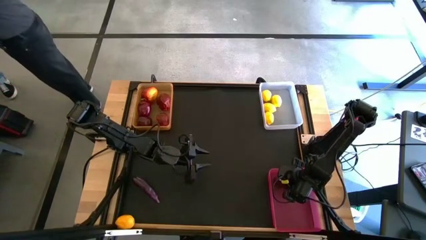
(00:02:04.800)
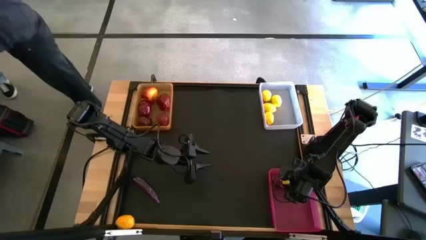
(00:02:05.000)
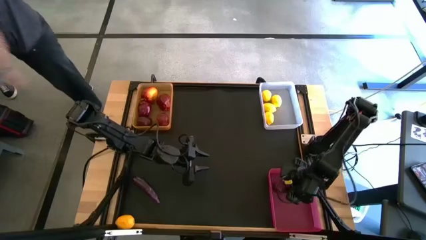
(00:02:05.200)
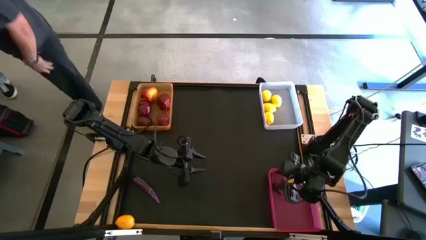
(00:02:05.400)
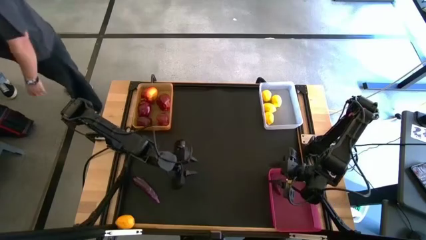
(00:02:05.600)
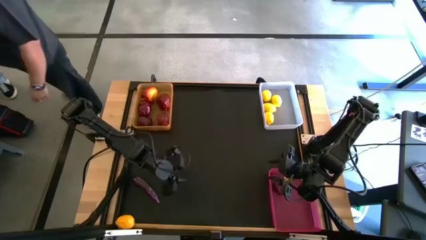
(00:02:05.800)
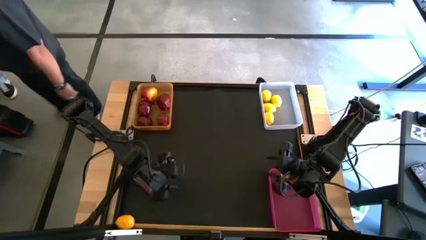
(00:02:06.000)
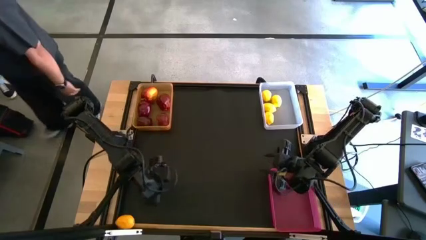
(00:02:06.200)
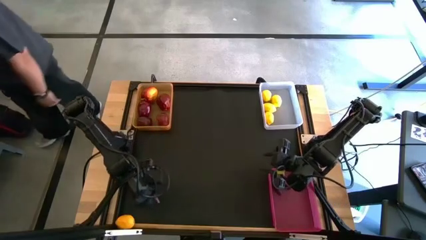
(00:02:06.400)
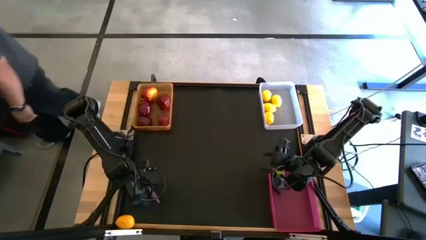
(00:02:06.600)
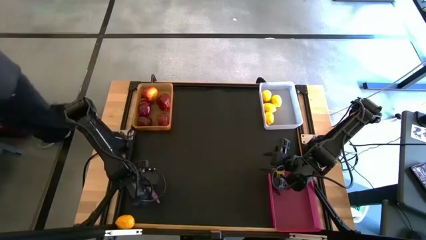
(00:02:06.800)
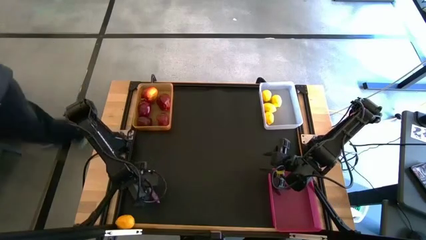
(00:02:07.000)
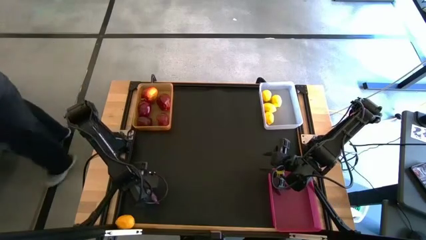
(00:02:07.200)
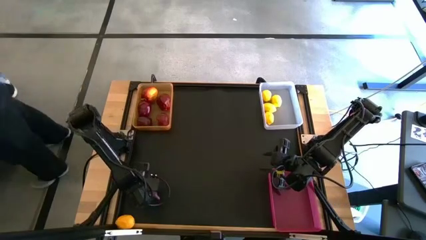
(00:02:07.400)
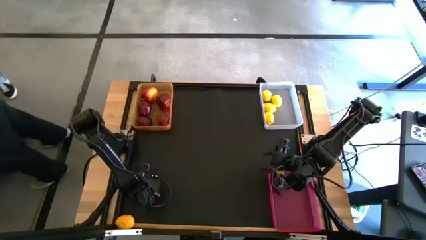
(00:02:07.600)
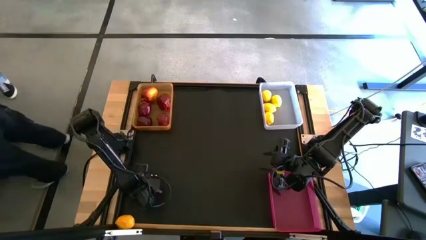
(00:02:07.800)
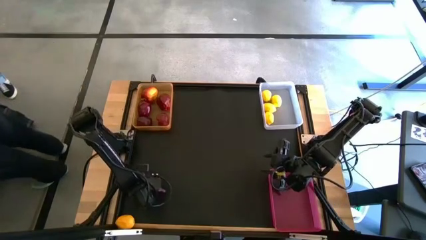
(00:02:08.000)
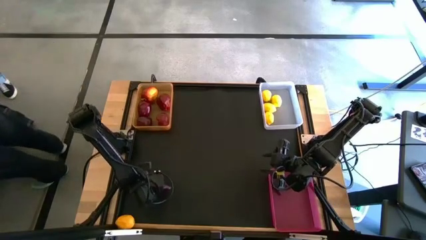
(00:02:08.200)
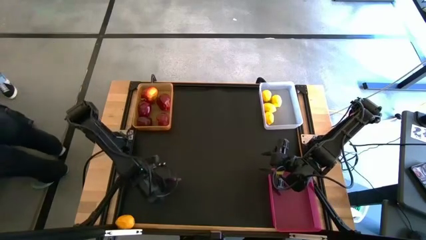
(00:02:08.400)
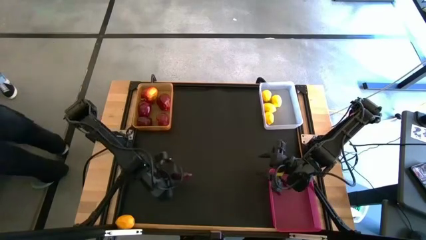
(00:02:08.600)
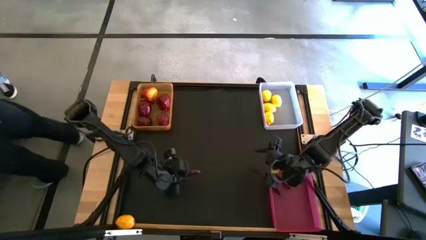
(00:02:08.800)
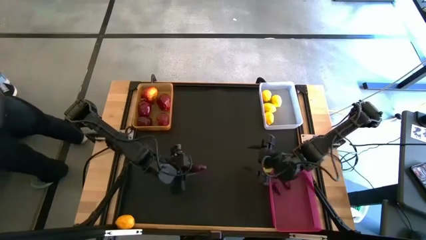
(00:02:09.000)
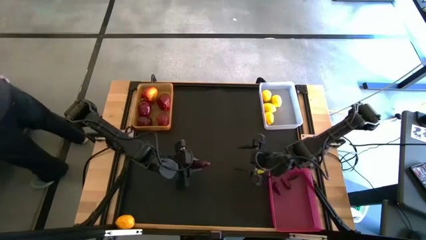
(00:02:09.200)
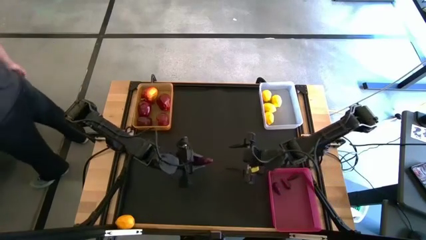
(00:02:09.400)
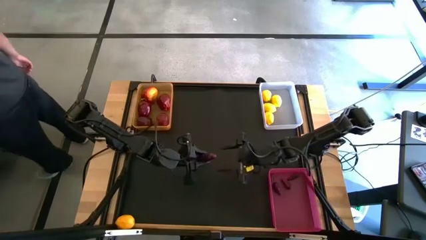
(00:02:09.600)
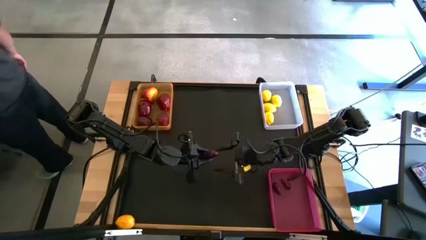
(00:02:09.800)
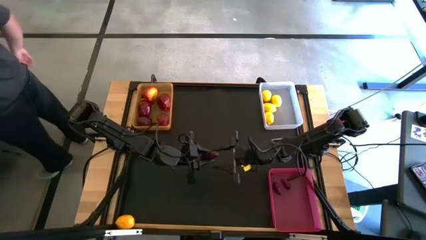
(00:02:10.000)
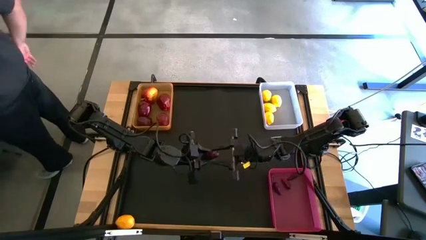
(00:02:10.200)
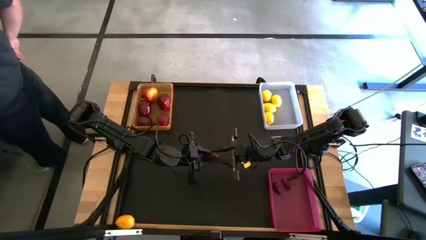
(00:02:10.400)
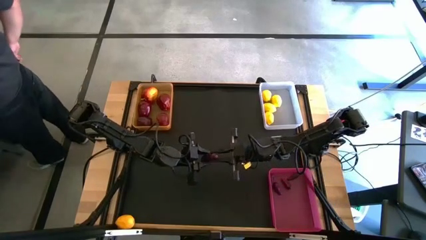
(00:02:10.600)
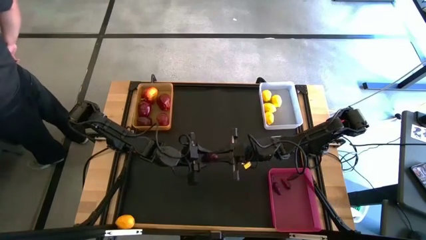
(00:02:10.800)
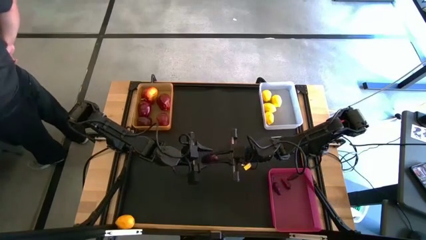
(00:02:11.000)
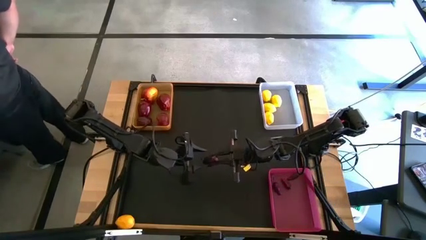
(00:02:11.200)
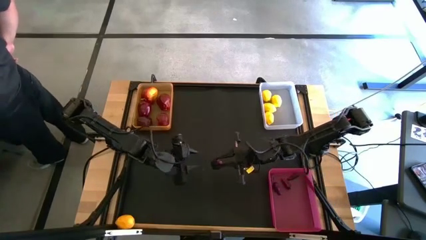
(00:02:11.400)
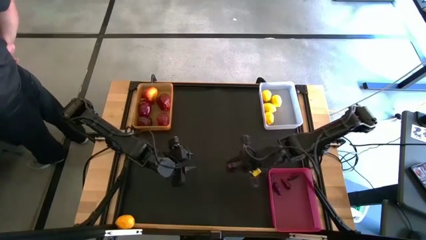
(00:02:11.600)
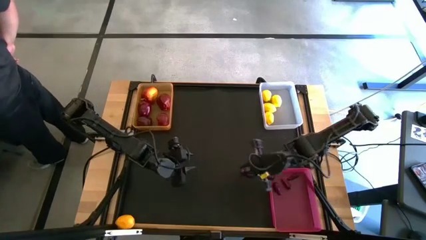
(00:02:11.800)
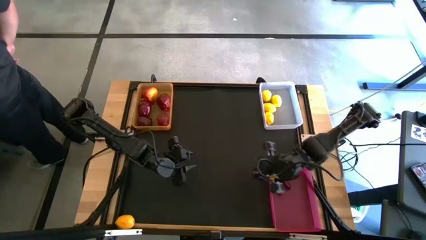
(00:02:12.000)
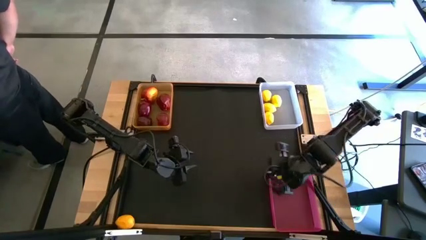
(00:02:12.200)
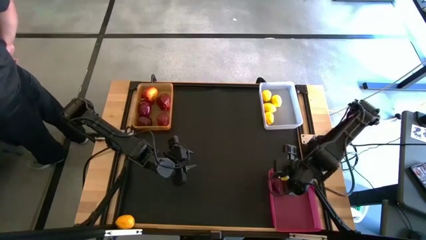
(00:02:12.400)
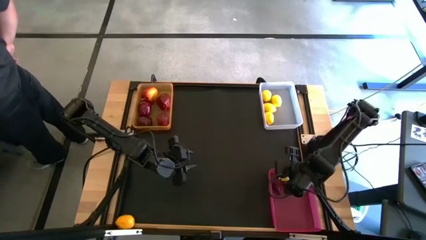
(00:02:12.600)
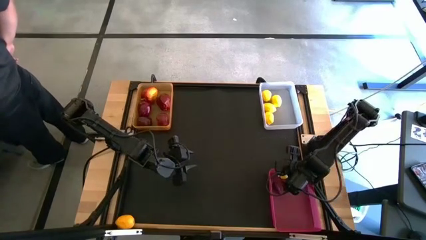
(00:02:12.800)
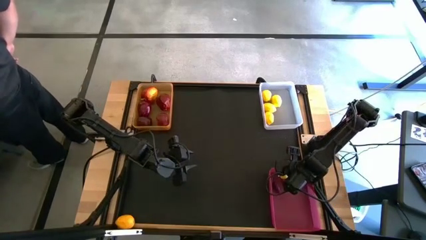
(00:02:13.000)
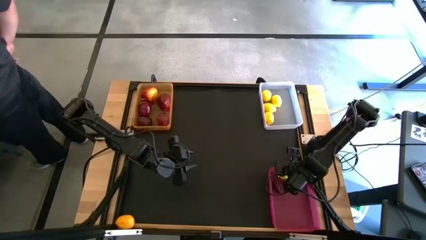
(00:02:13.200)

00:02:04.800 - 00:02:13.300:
Task: Sort produce into baskets
Put the eggplant into the red bin

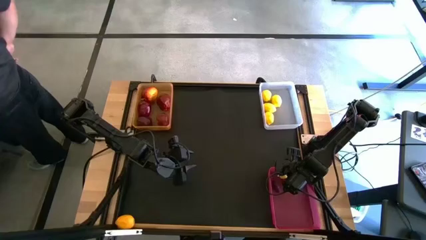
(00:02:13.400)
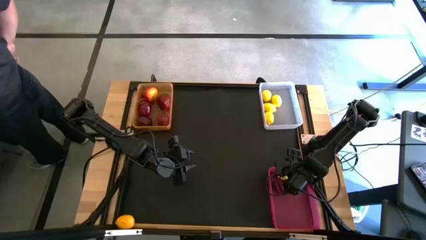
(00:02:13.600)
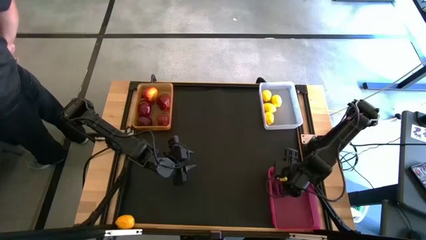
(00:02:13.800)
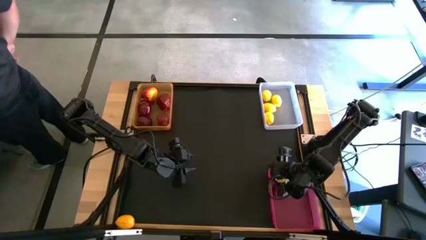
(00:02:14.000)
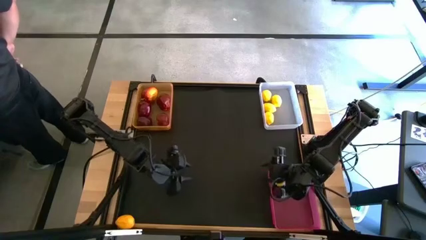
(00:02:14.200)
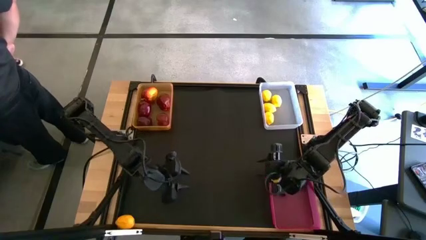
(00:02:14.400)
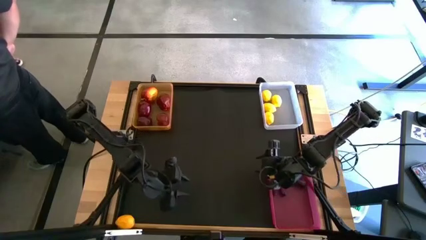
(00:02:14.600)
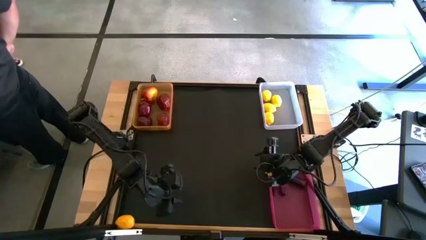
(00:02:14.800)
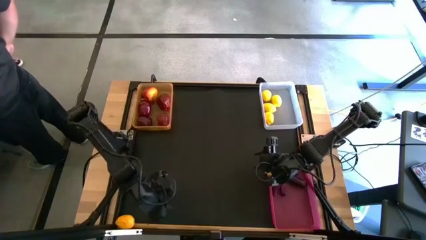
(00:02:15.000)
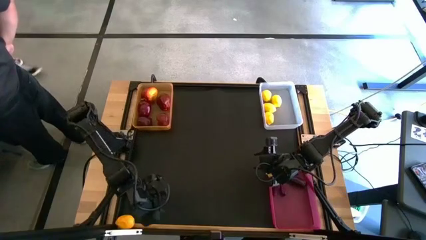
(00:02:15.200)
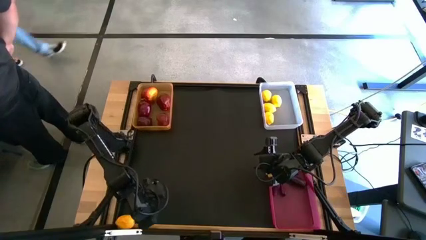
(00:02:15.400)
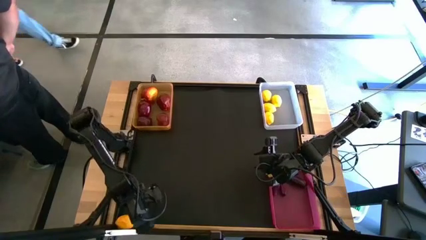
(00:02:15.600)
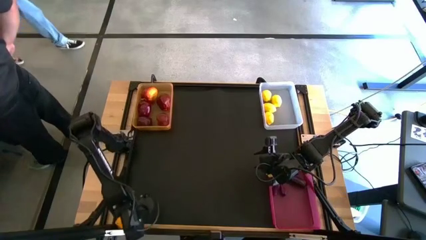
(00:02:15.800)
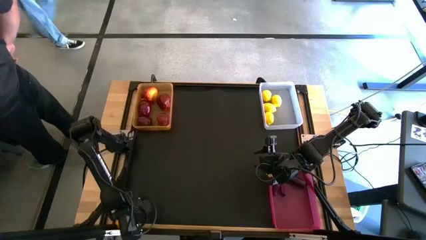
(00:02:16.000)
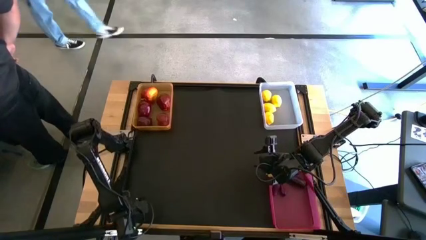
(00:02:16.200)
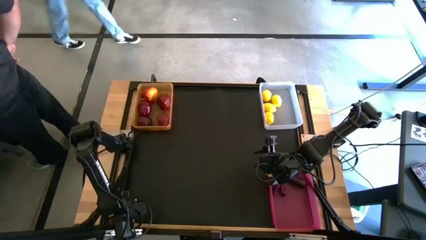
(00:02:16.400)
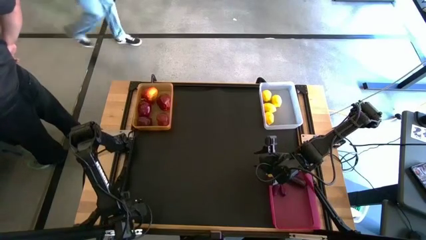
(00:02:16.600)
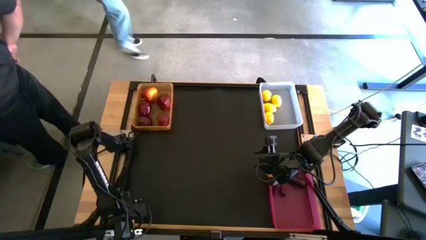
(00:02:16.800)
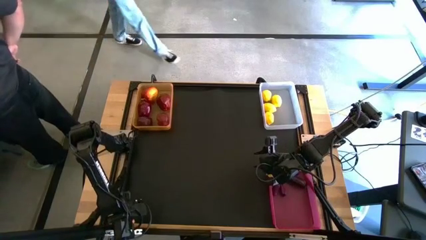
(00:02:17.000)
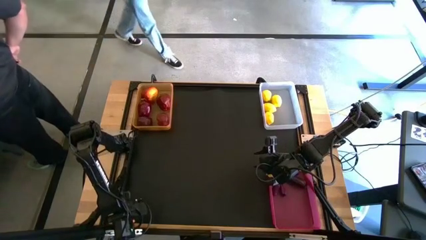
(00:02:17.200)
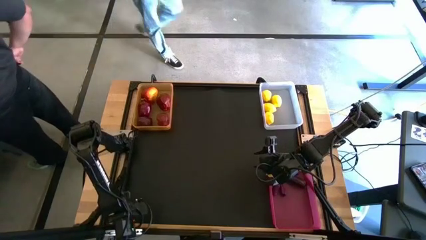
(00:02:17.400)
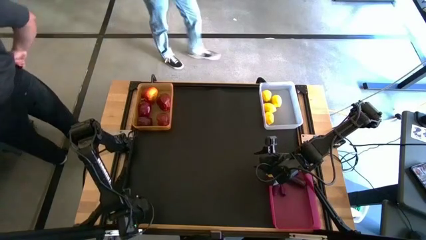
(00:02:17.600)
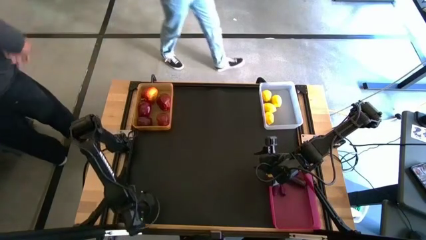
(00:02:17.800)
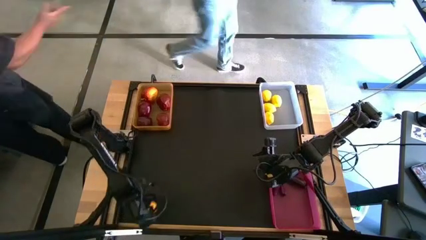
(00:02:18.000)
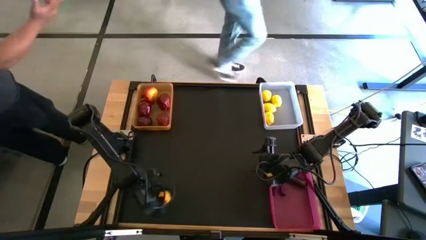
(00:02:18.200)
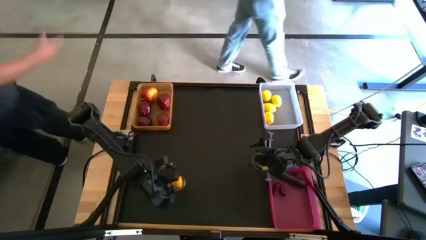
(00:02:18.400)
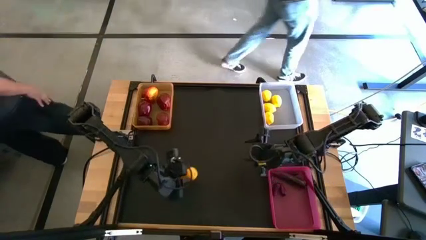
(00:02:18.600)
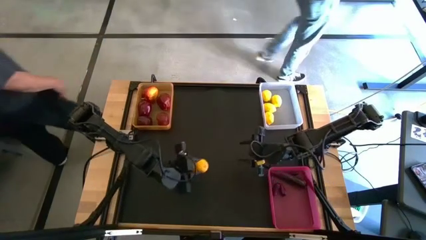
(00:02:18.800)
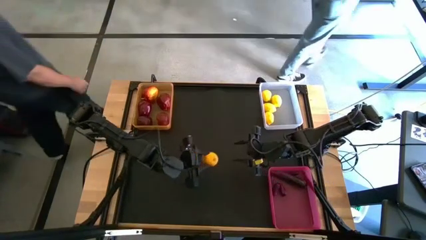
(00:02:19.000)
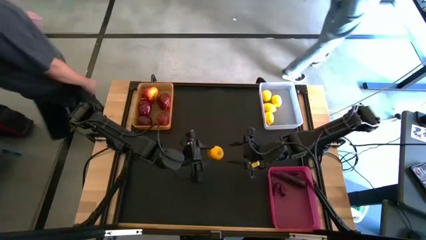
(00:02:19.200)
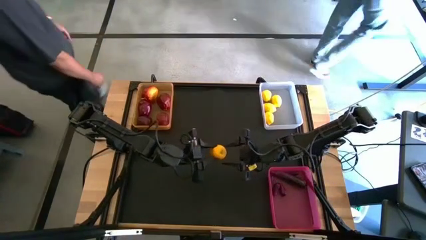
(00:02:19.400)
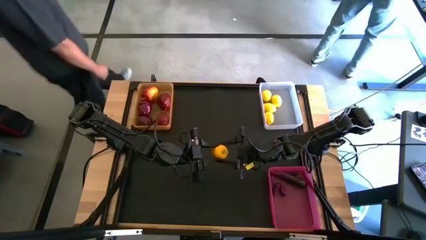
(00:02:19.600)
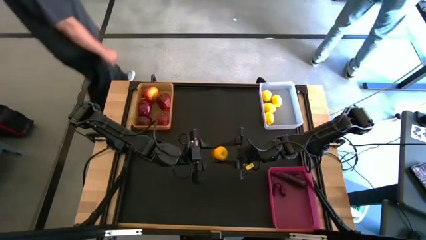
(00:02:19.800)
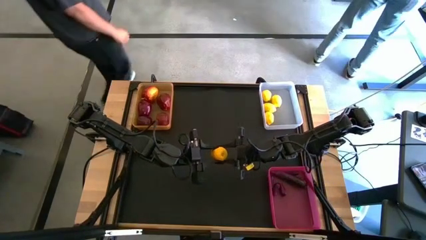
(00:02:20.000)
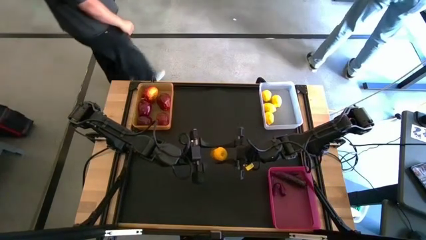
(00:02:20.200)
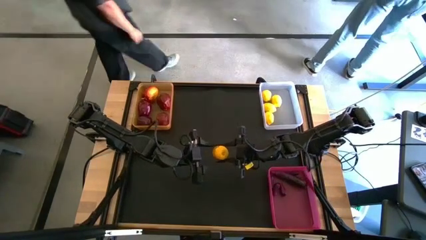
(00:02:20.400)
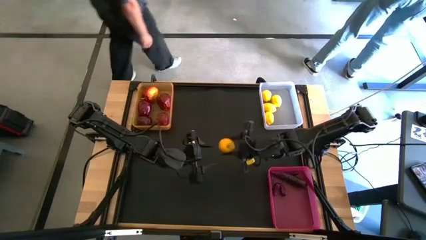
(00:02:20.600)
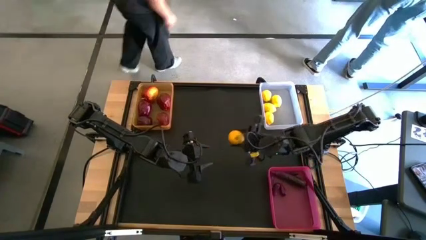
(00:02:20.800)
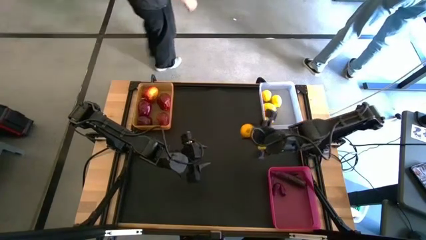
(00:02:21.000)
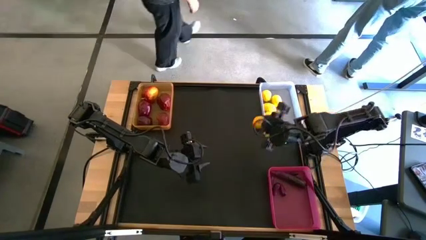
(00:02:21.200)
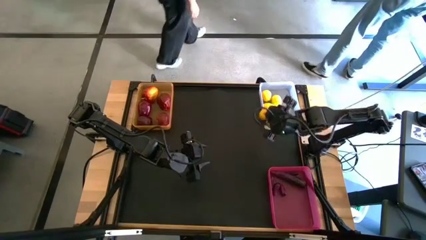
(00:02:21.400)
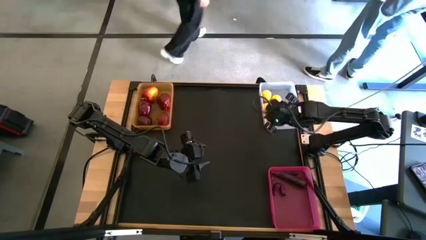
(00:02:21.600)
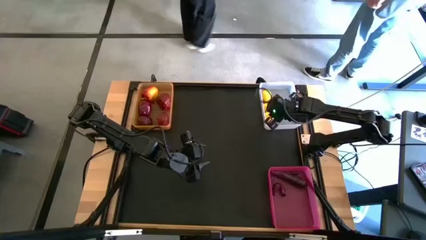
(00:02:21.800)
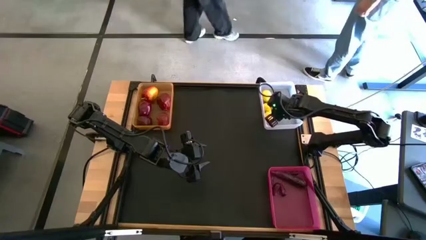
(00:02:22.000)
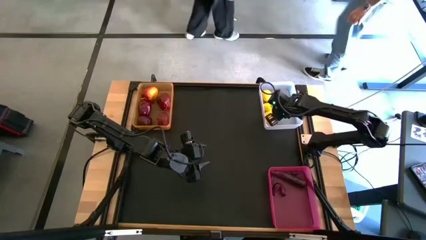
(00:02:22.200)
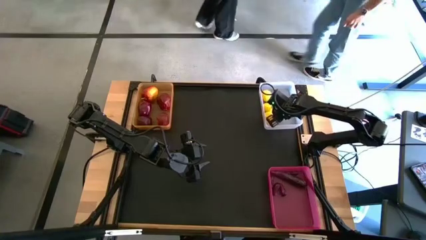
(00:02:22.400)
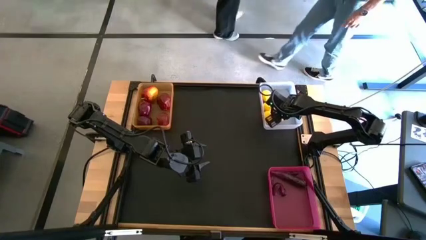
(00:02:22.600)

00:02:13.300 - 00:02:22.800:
Put the lemon into the white bin
